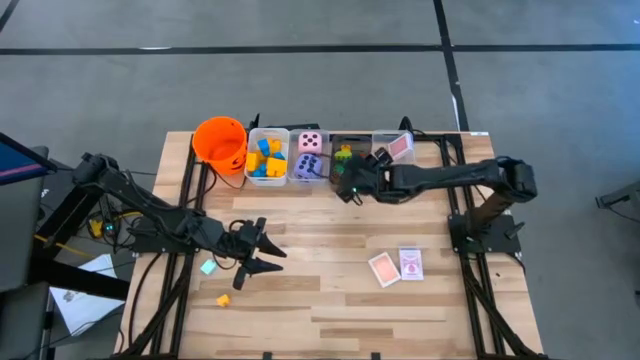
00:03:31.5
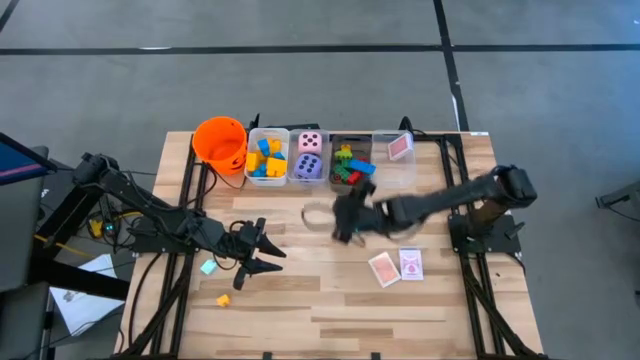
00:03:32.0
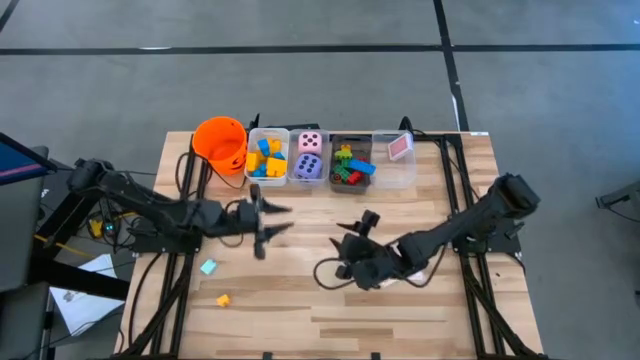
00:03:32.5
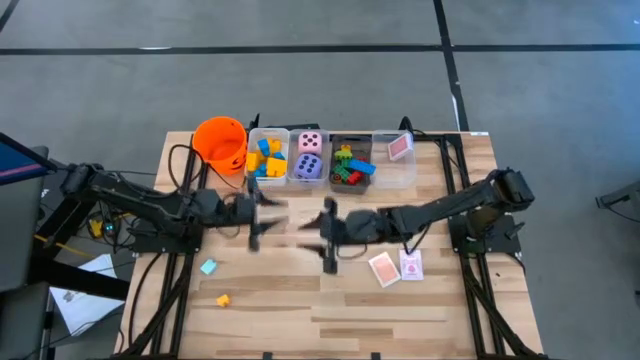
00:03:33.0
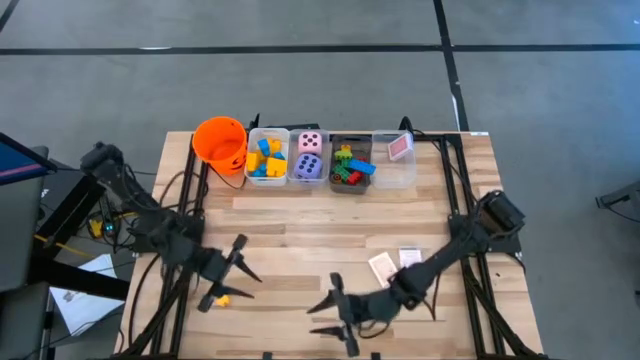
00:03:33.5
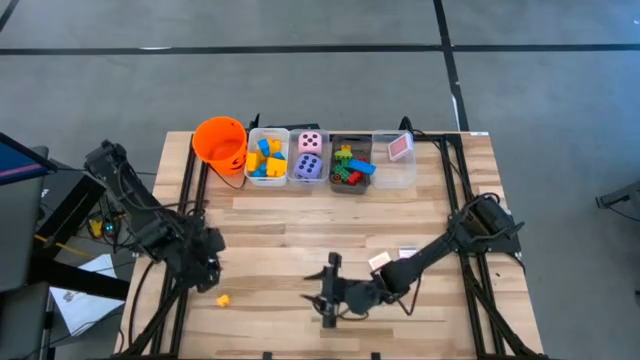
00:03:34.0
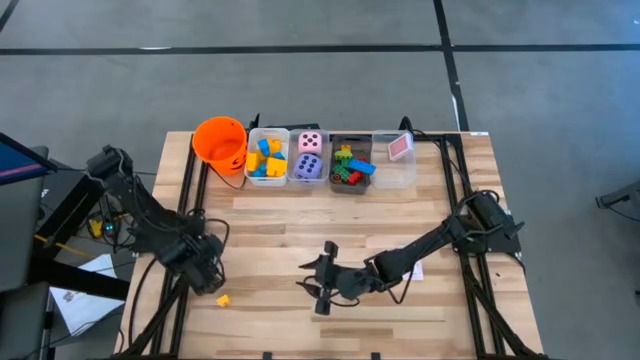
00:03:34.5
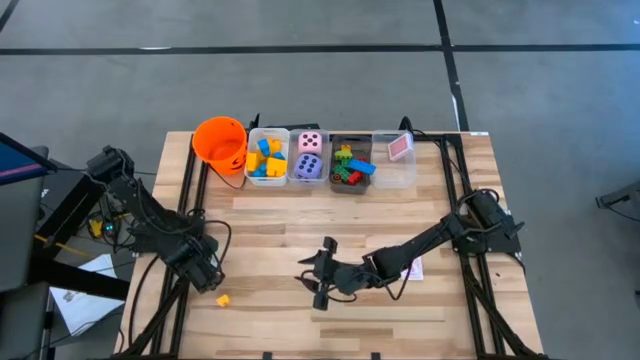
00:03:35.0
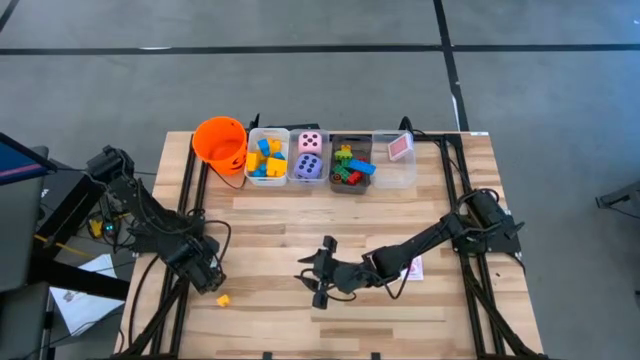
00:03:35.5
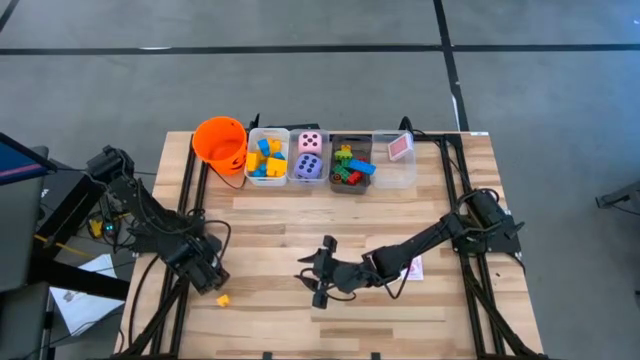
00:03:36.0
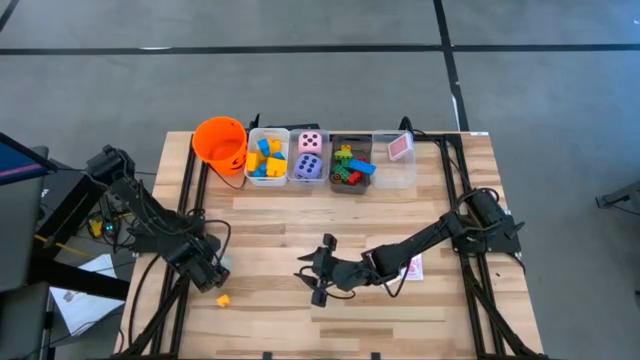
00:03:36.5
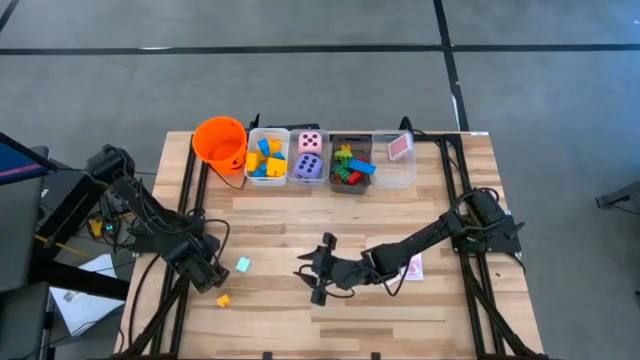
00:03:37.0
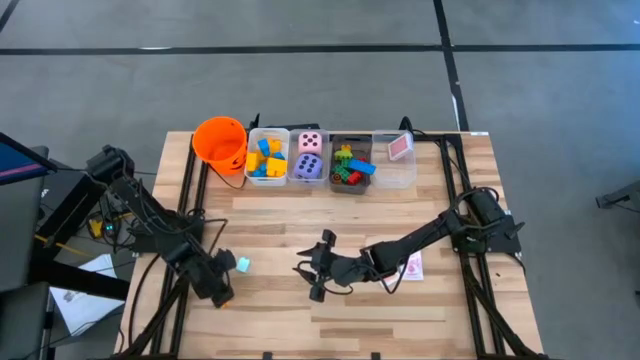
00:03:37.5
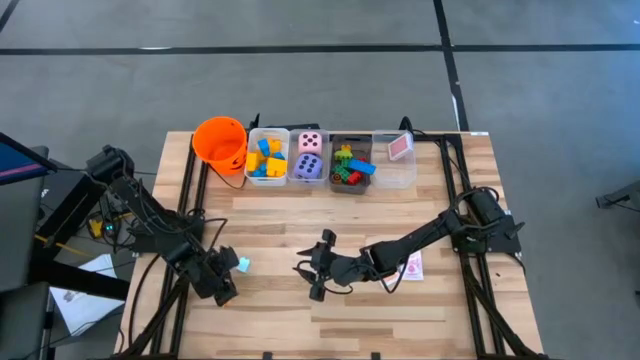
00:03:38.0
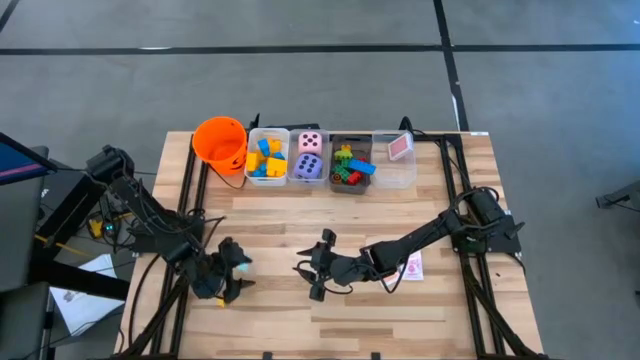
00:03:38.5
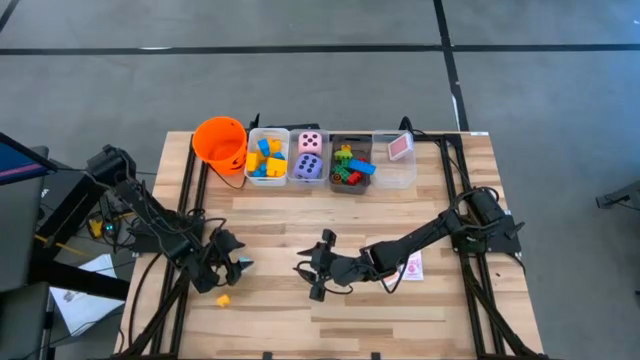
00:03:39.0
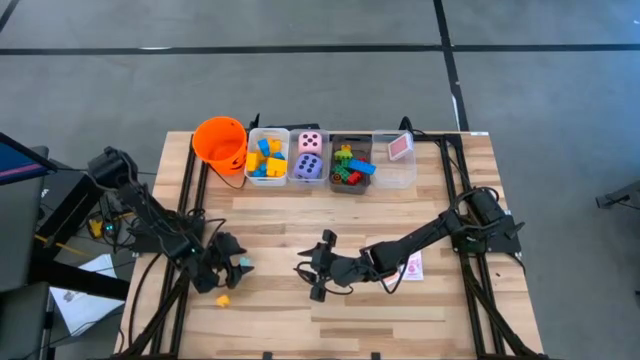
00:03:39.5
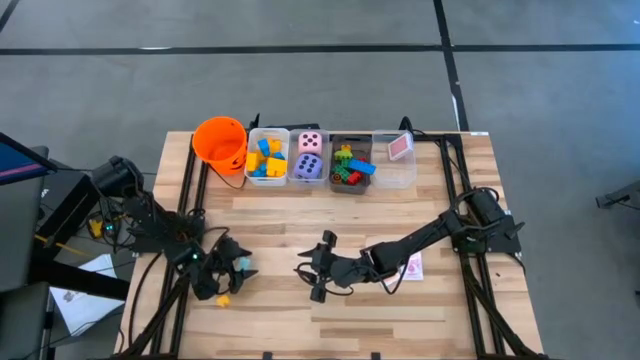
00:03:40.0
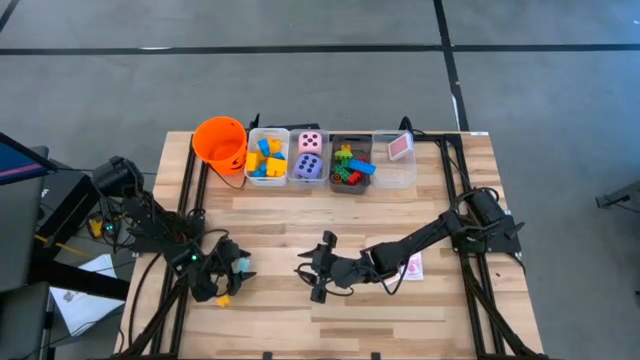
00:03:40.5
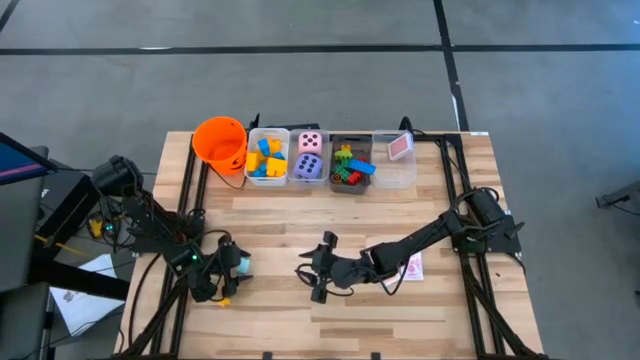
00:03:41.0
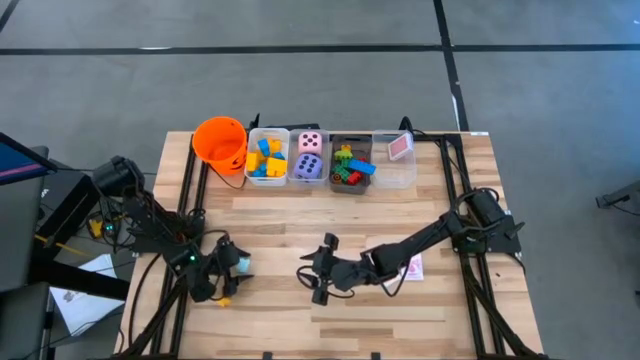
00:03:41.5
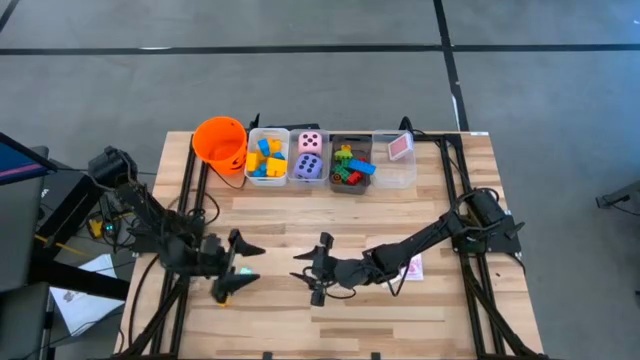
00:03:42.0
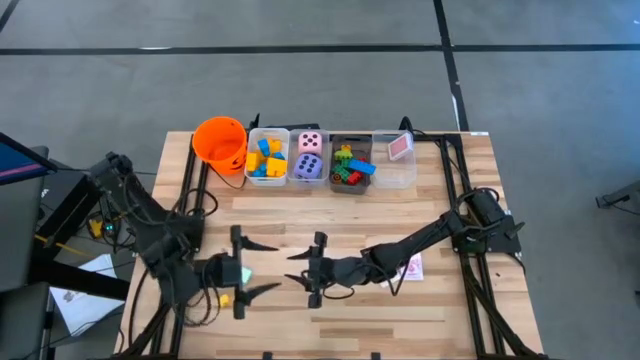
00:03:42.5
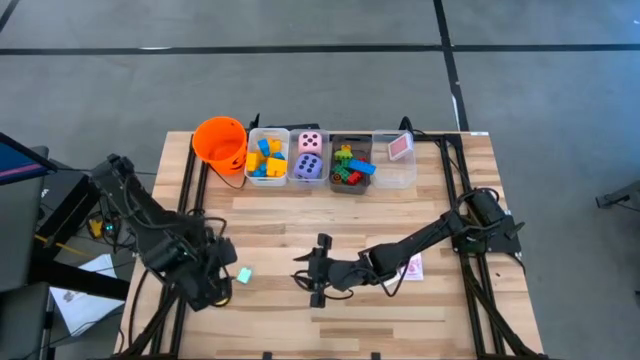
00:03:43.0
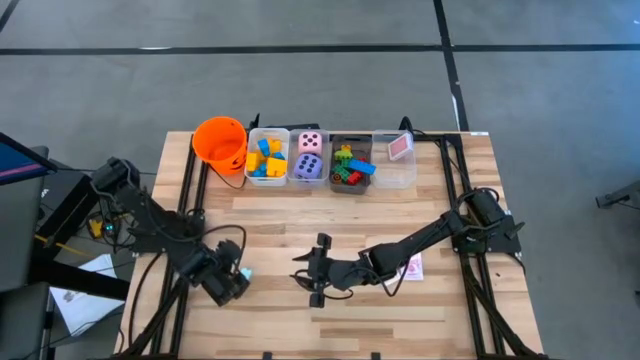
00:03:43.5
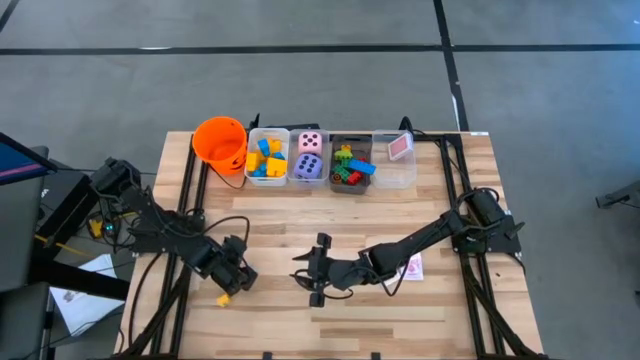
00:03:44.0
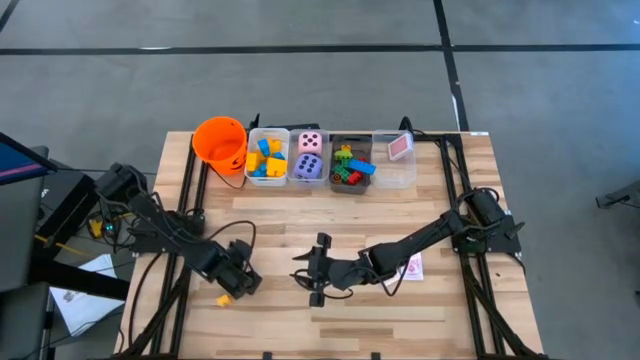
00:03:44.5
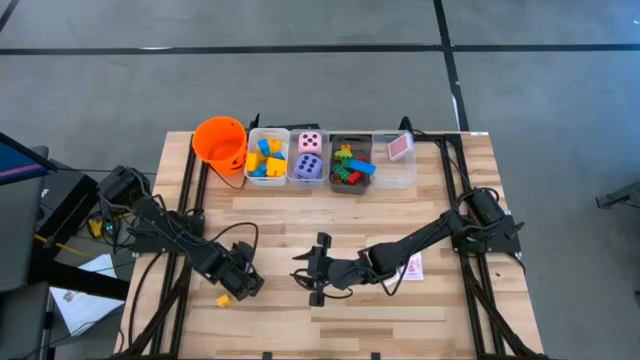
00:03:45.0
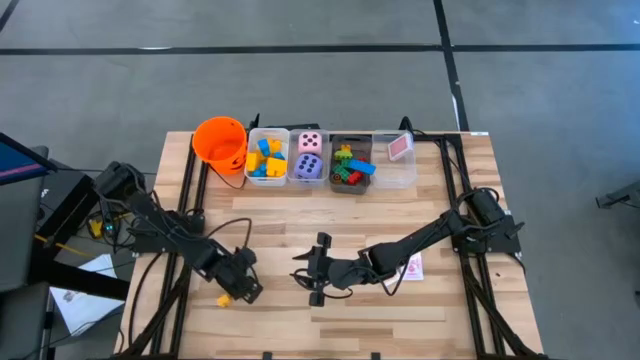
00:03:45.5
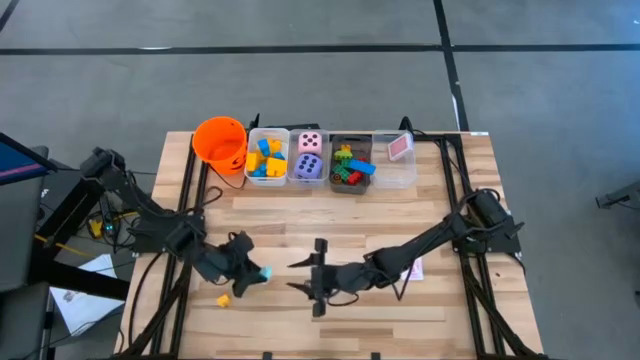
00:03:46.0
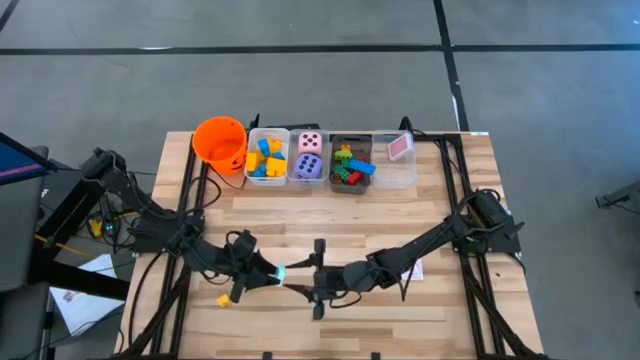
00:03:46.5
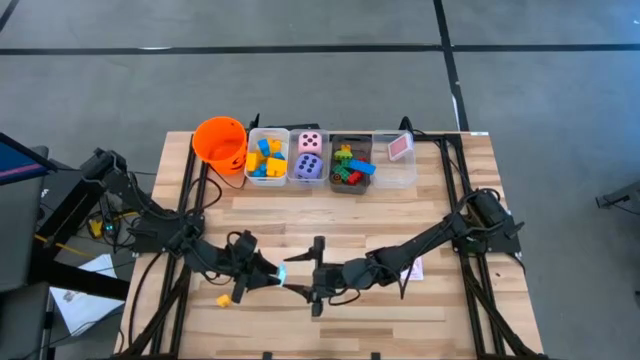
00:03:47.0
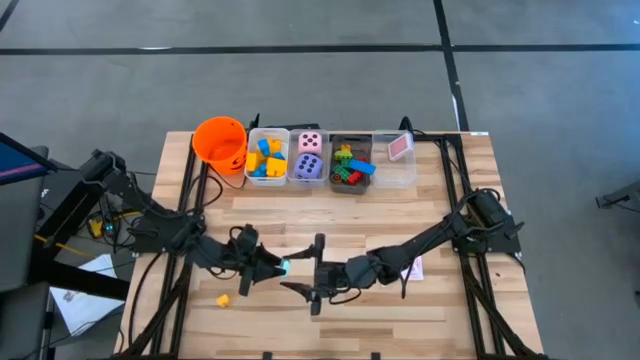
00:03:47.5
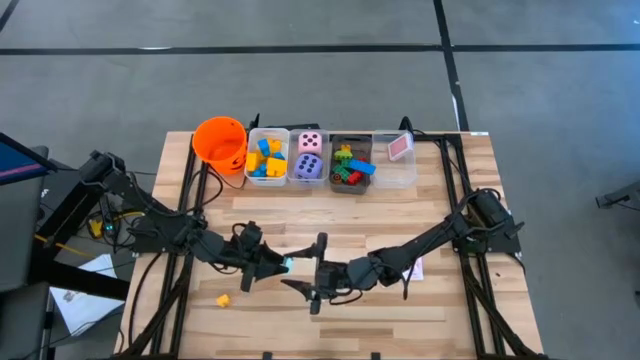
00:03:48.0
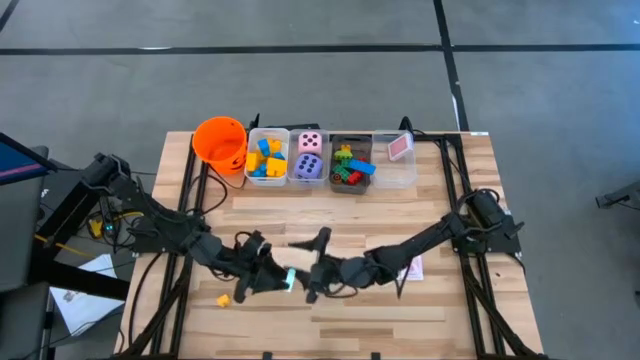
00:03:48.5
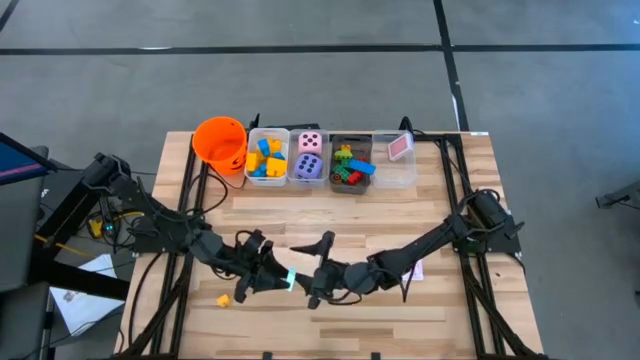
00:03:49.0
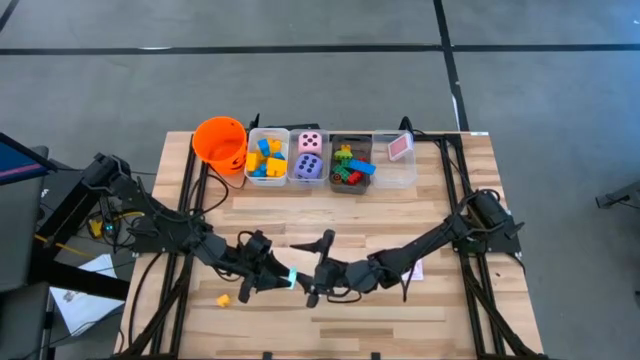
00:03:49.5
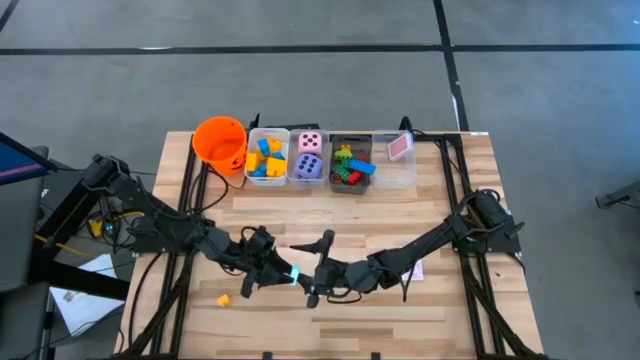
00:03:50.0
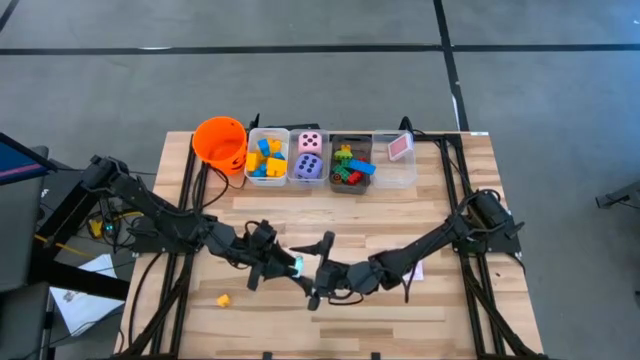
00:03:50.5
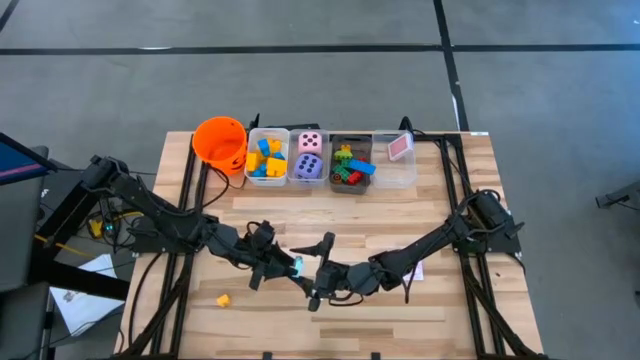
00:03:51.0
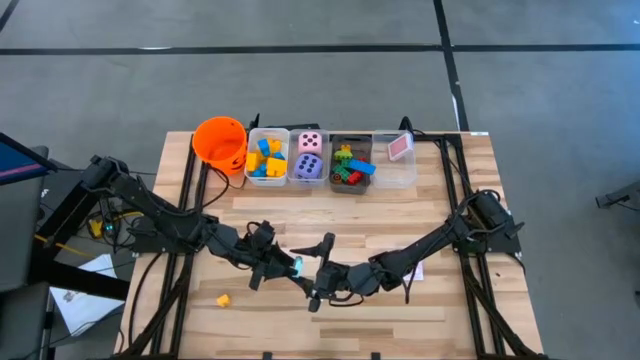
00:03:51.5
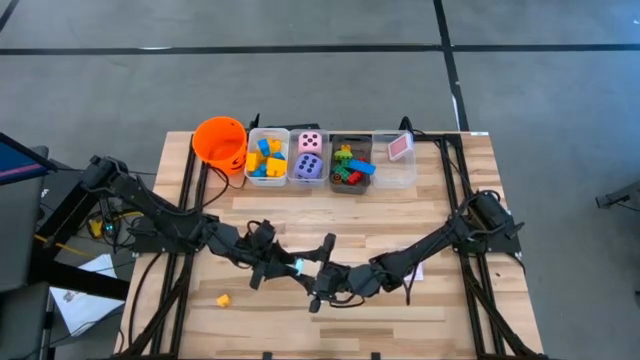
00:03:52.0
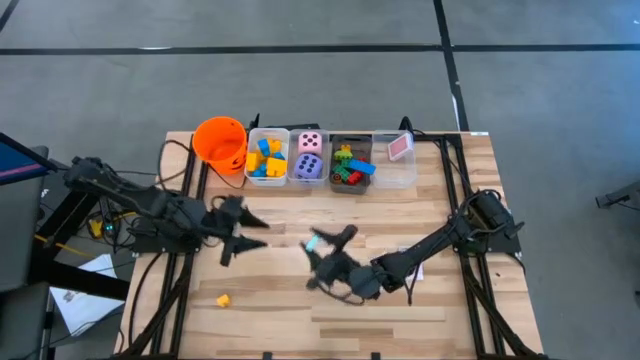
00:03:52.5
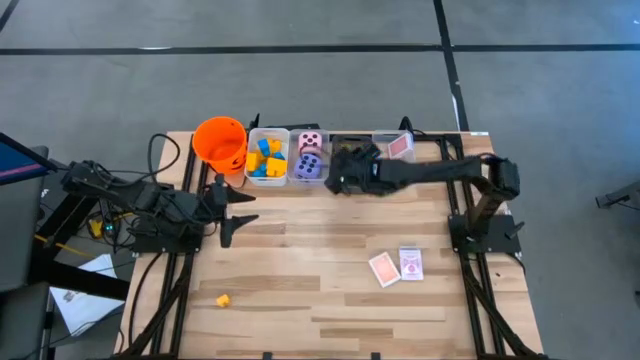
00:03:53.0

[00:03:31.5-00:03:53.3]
Task: Pick & Place Toys
Put the light blue game piece into the black bin
